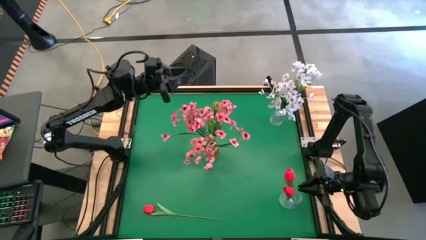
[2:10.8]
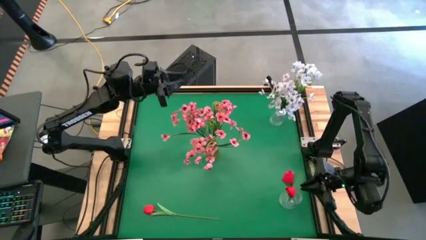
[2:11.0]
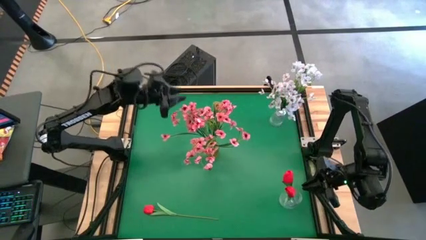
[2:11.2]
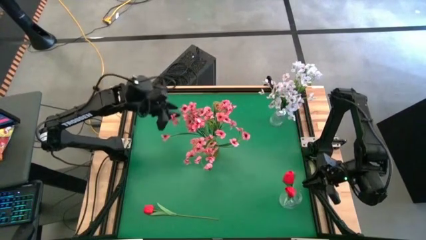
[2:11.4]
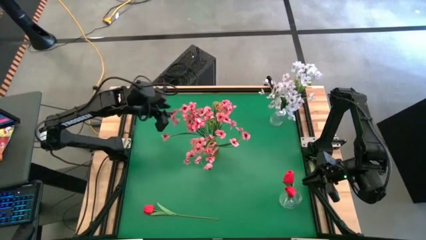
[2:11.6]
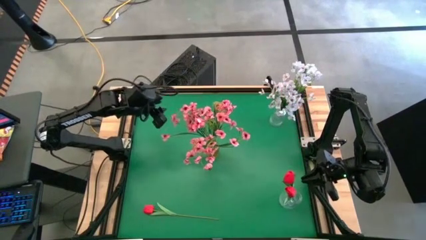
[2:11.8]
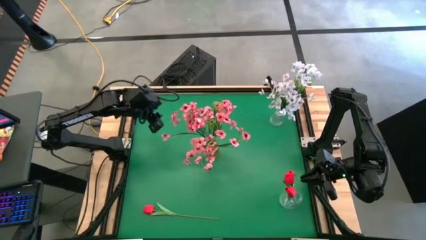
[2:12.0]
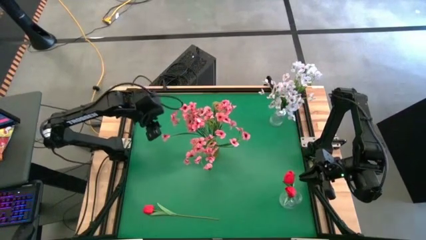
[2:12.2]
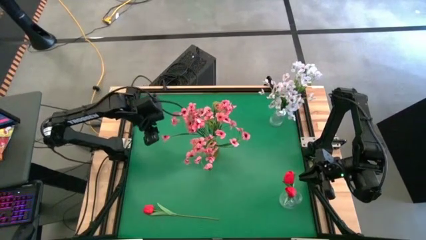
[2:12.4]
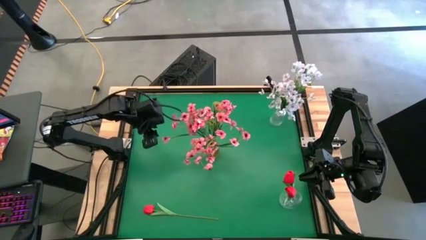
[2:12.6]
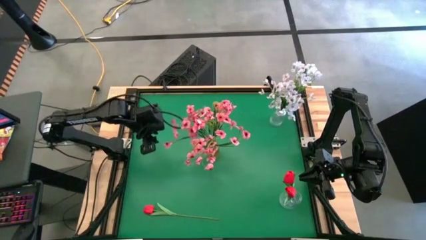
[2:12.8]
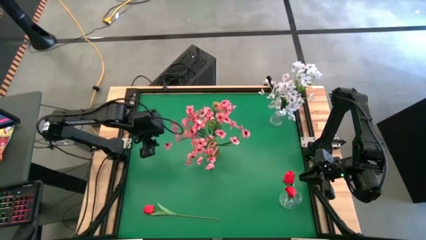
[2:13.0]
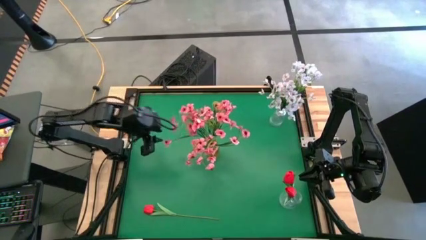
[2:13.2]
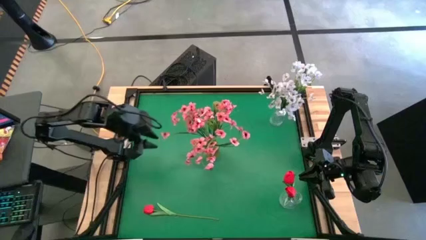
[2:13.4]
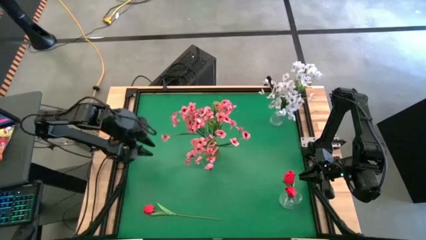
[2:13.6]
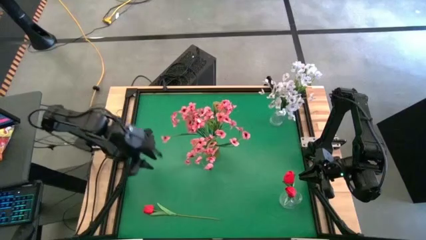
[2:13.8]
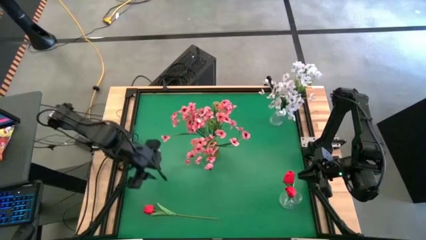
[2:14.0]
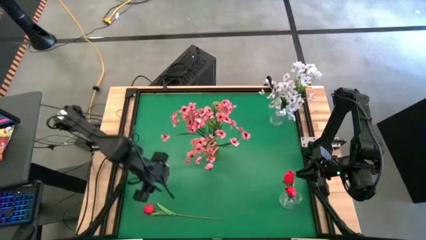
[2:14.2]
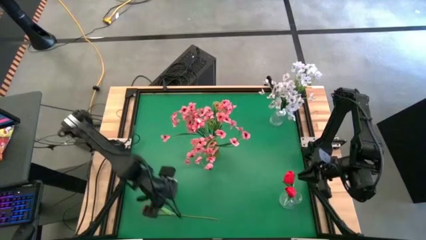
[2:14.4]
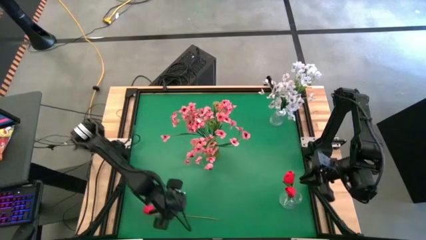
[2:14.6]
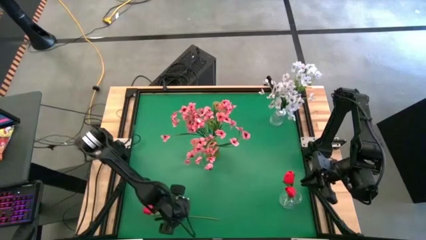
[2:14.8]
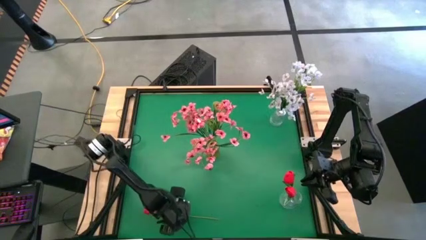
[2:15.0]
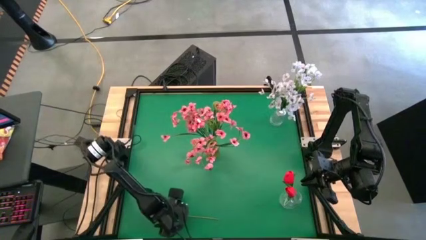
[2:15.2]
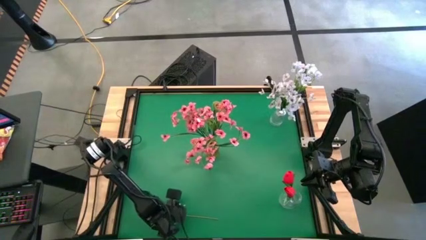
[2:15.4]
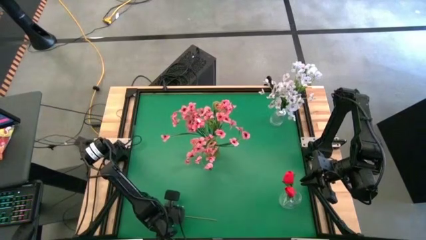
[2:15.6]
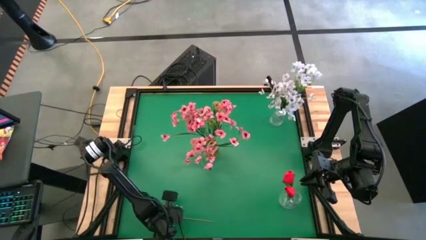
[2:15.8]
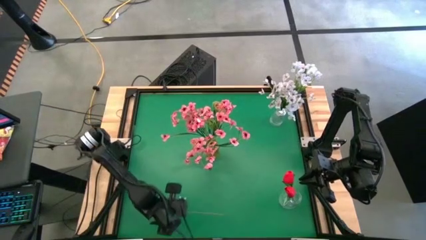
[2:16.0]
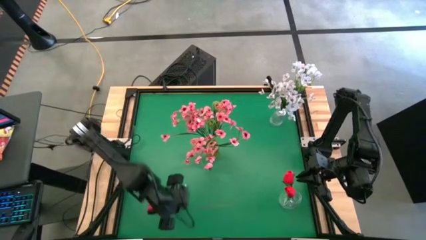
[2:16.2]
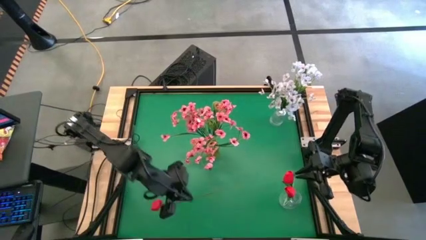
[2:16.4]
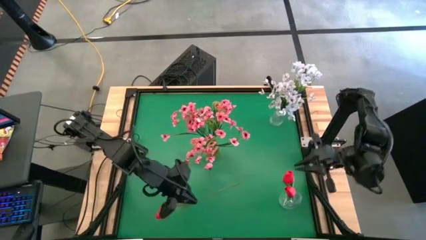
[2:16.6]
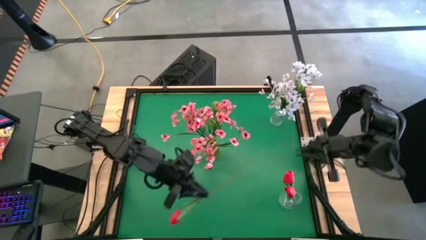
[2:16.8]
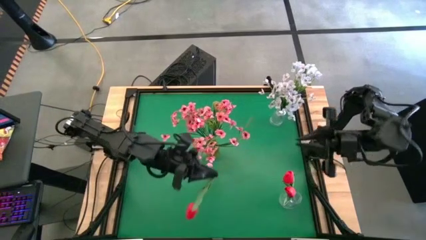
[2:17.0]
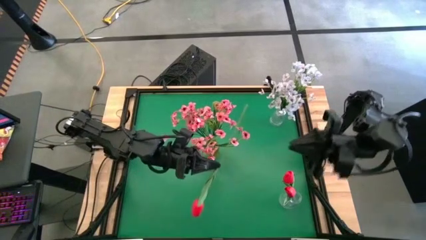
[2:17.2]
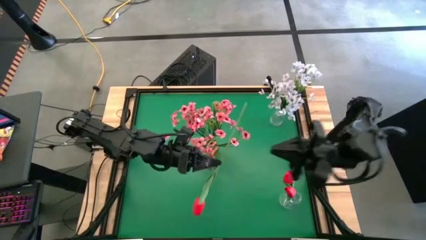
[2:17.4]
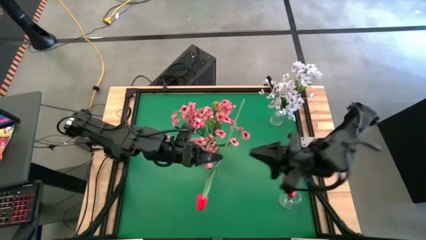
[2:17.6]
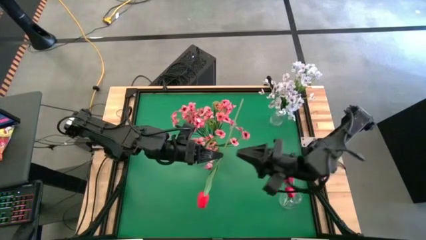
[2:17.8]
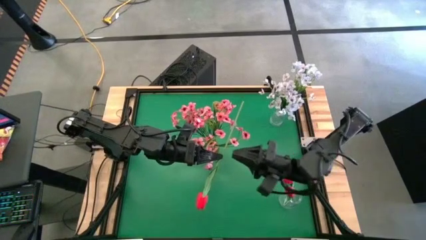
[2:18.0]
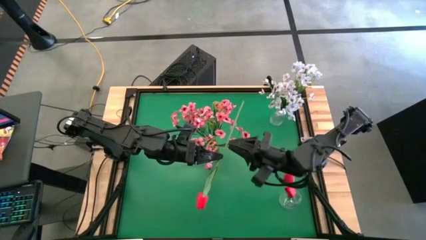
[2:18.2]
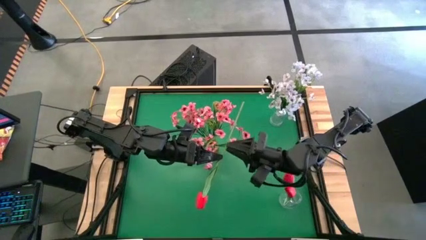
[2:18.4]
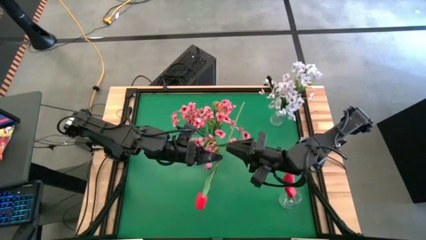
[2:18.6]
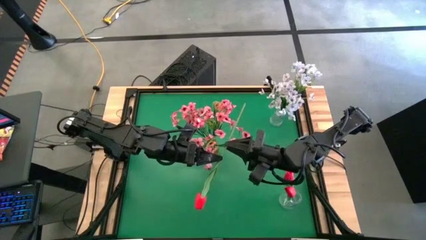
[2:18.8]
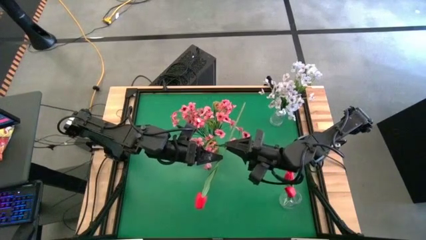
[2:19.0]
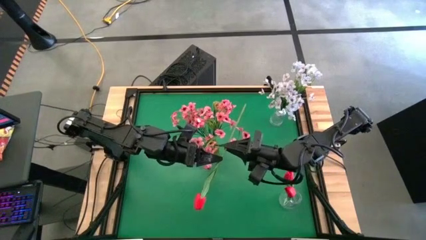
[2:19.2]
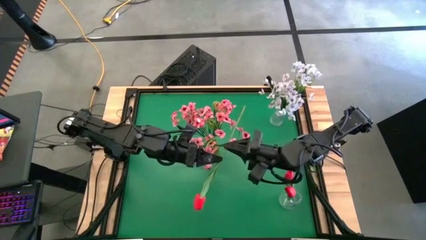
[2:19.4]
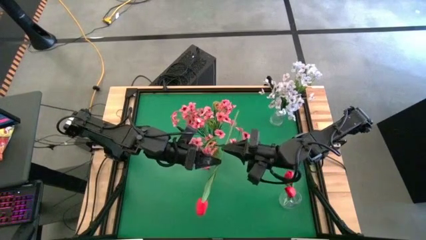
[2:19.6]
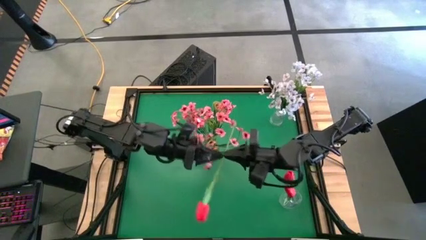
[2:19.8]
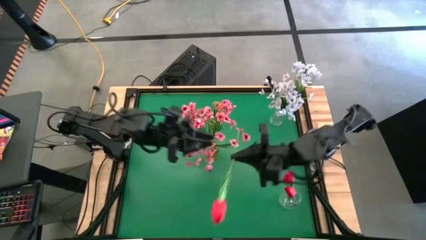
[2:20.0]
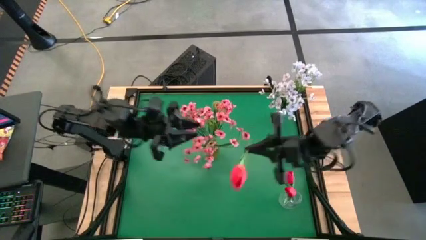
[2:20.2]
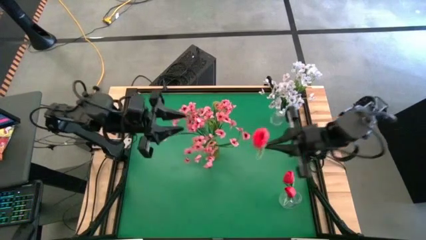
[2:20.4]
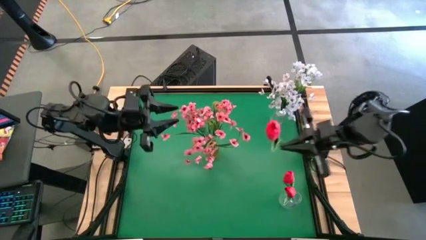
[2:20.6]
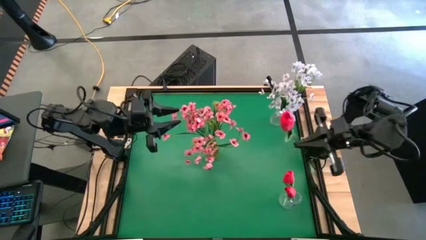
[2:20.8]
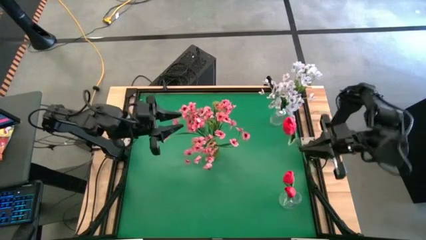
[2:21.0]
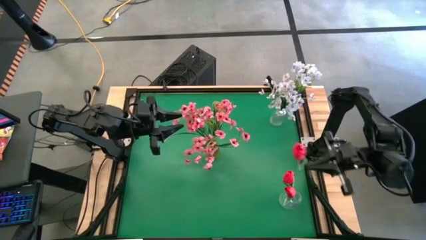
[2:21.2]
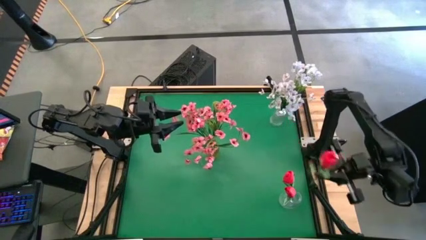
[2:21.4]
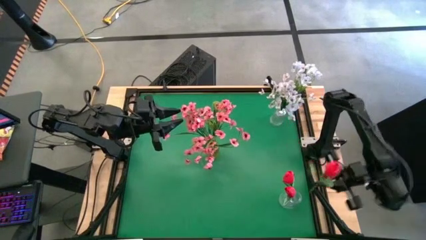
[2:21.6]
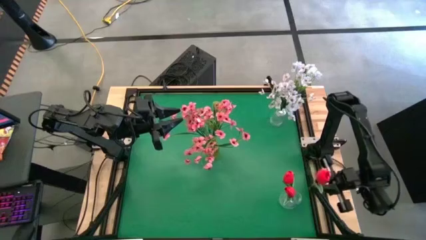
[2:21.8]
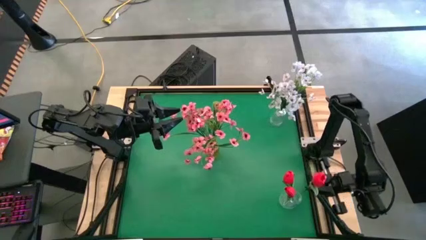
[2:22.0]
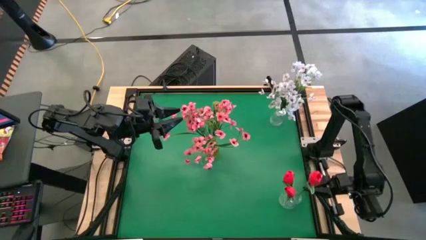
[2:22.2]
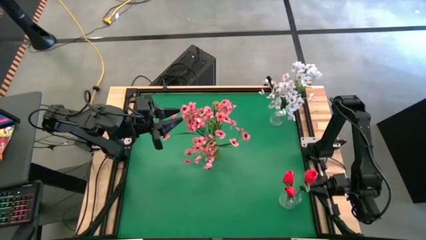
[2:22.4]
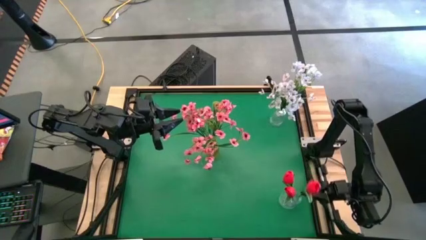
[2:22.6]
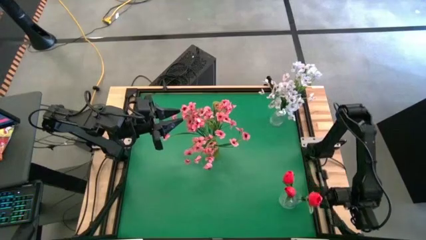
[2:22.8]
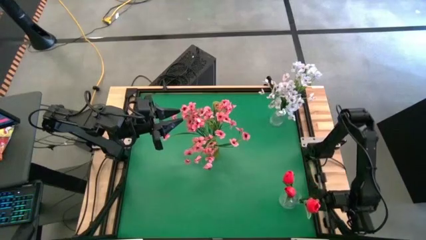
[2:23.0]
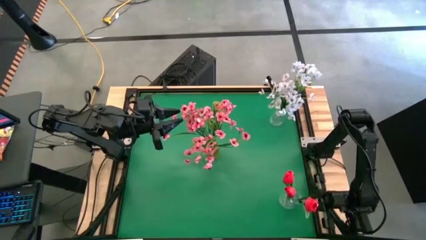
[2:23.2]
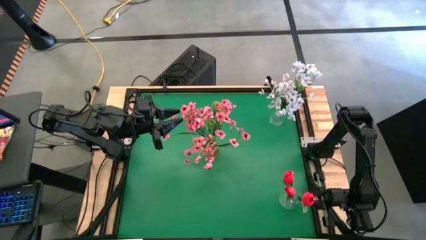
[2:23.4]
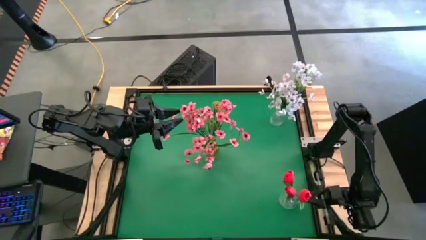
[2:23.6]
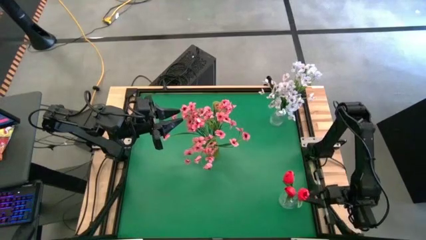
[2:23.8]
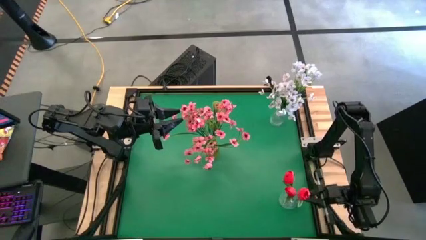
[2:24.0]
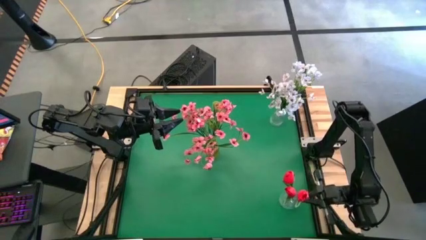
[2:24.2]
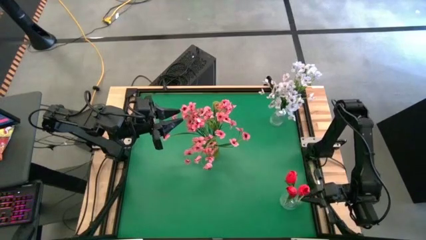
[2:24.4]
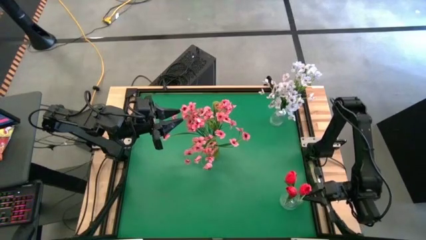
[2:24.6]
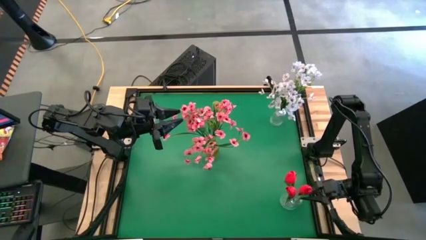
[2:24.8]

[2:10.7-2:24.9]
Task: Sort flowers into vase by color
Put the red flower into the bottom transparent vase

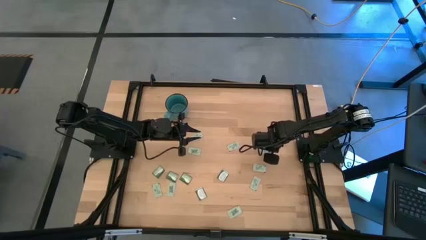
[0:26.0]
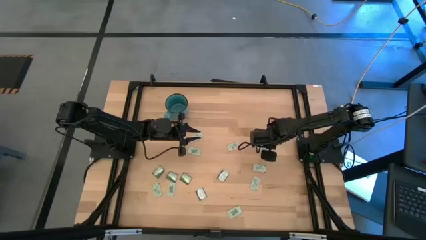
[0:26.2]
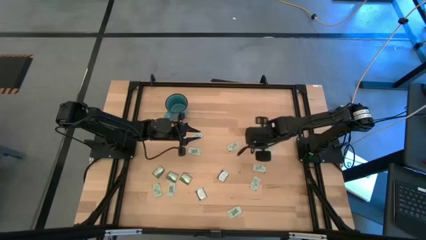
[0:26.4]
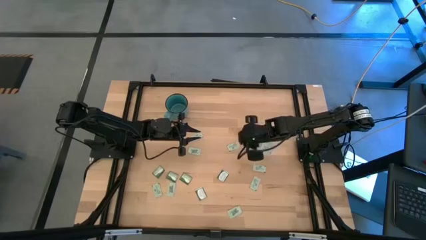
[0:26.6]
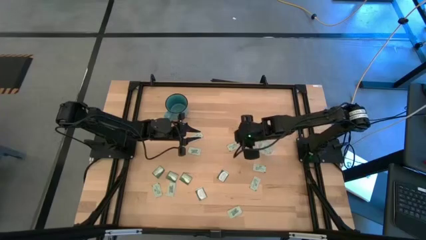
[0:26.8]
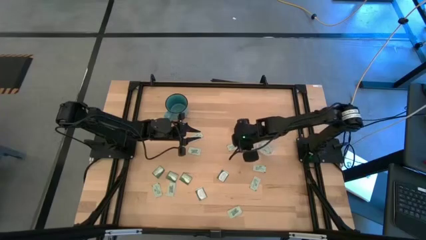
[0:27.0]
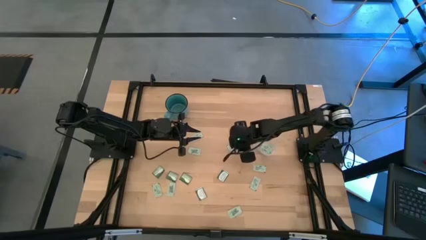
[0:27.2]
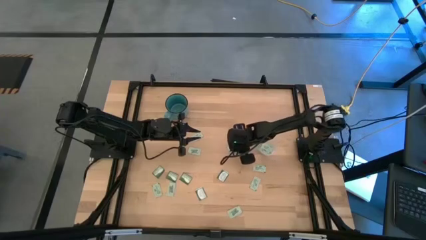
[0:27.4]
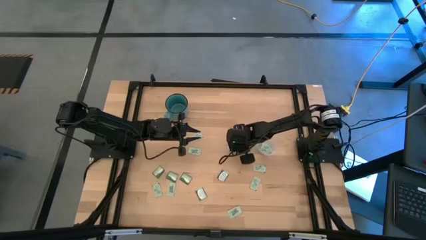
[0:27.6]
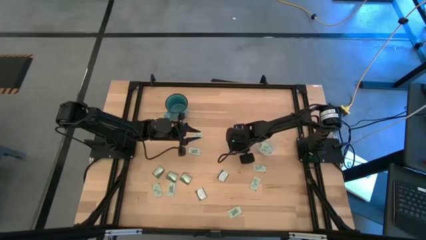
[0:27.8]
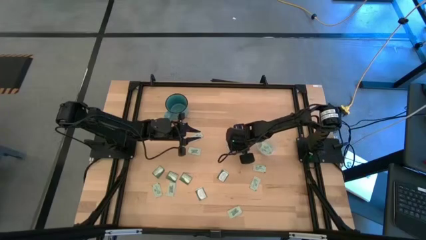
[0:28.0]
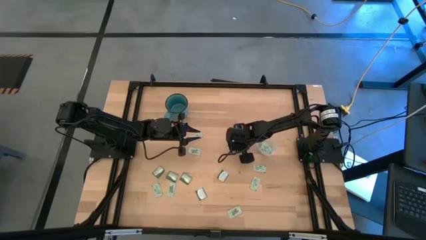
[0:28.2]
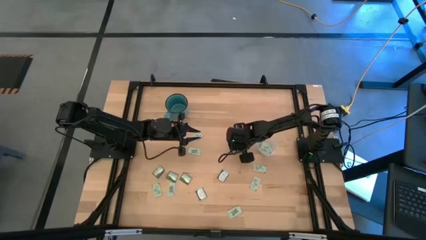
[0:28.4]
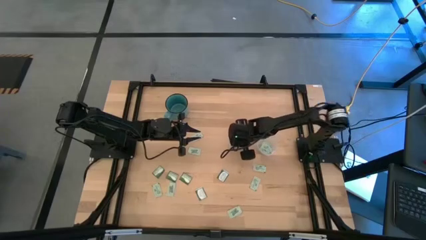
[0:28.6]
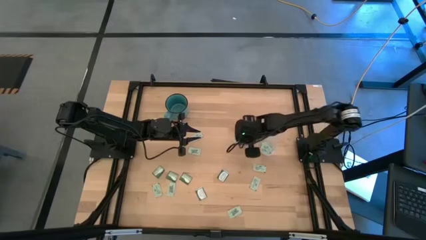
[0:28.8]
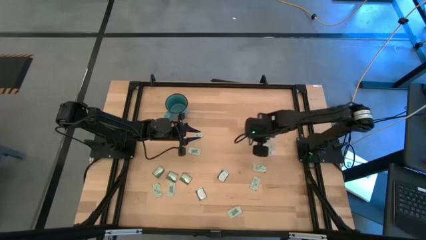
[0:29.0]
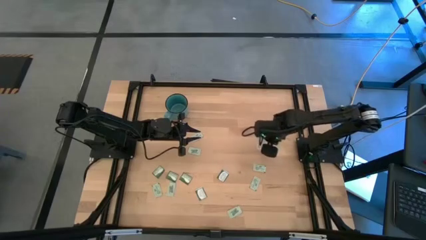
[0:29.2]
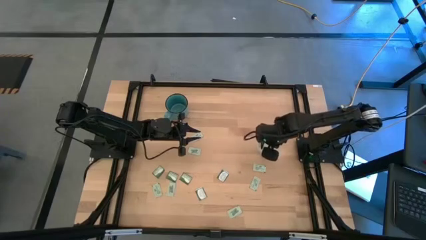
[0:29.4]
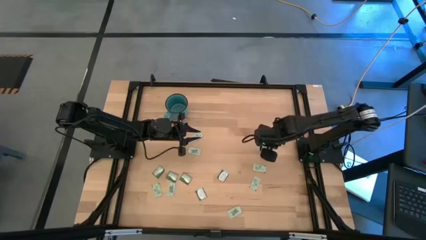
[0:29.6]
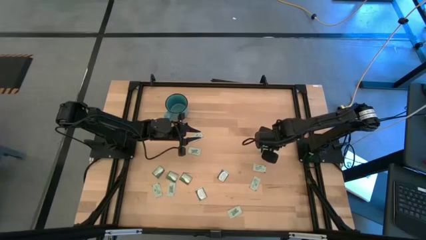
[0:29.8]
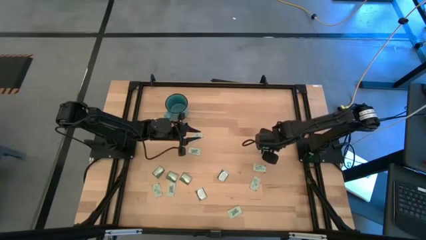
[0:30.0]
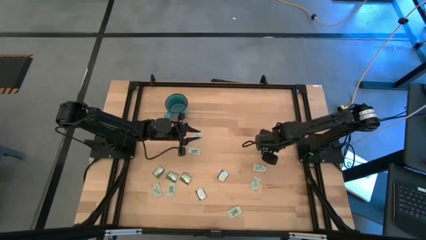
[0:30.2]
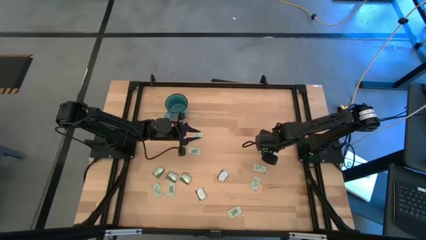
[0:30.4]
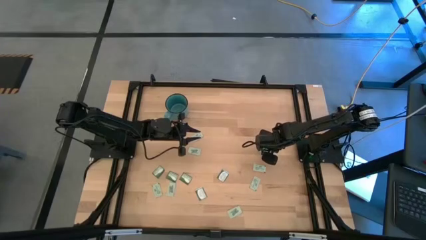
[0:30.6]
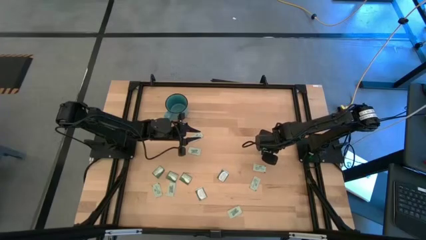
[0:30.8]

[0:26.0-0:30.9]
Task: Pick and place Stevia / Truvia into bins
Put the stevia packet into the transparent bin
